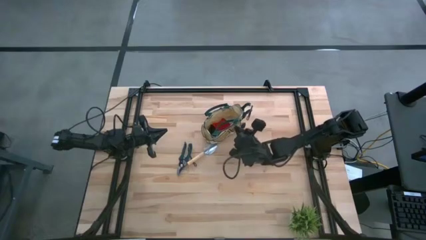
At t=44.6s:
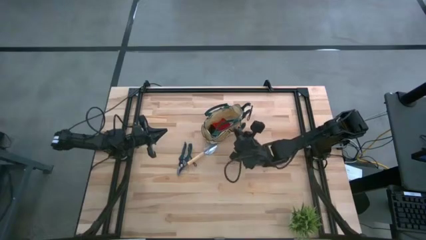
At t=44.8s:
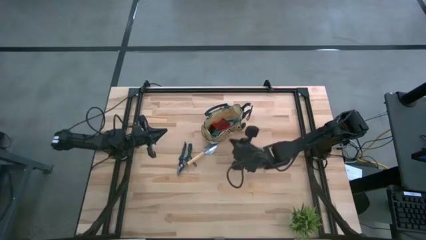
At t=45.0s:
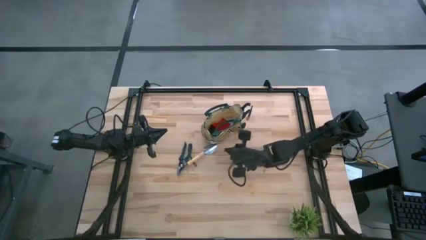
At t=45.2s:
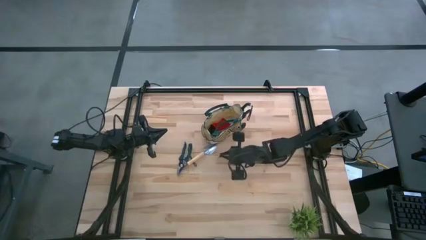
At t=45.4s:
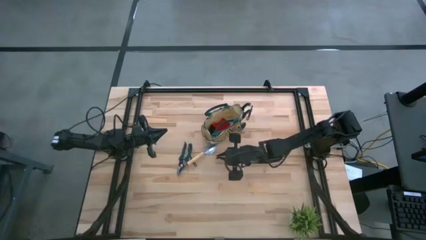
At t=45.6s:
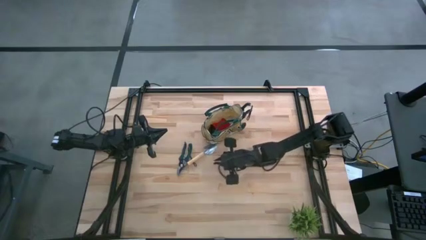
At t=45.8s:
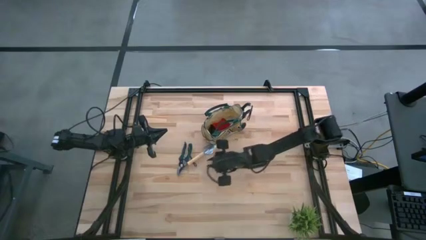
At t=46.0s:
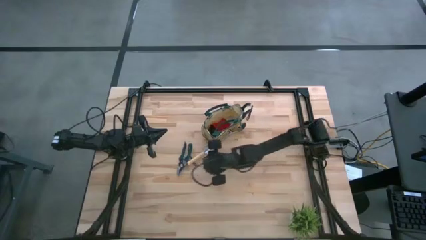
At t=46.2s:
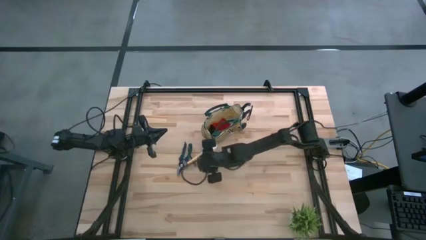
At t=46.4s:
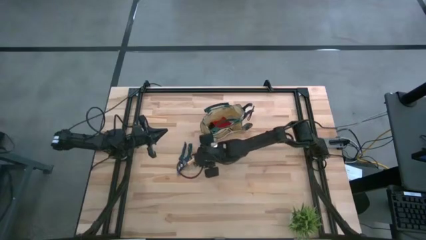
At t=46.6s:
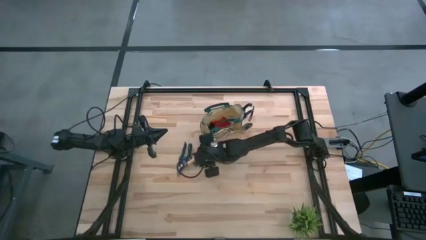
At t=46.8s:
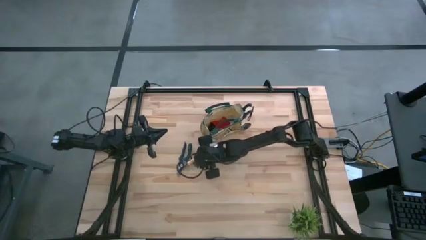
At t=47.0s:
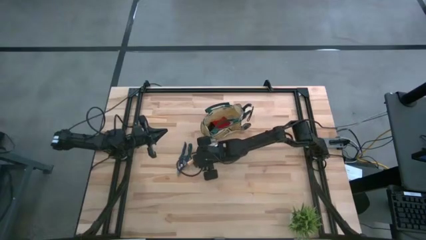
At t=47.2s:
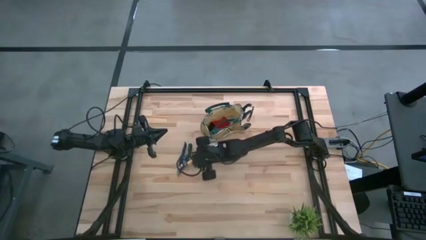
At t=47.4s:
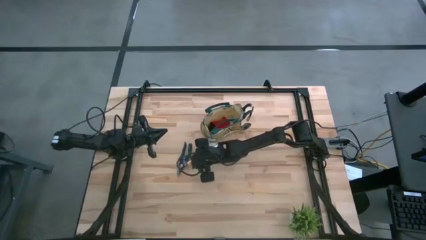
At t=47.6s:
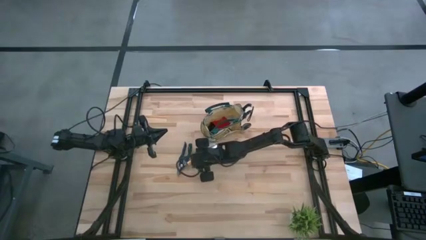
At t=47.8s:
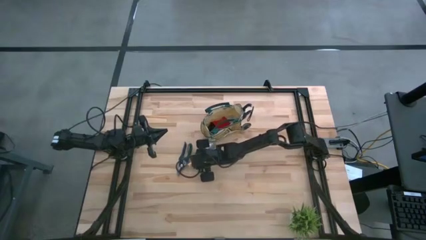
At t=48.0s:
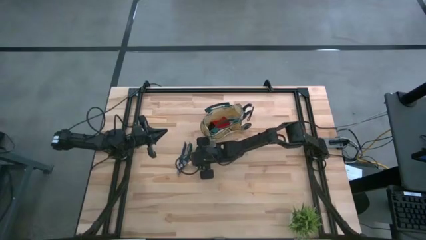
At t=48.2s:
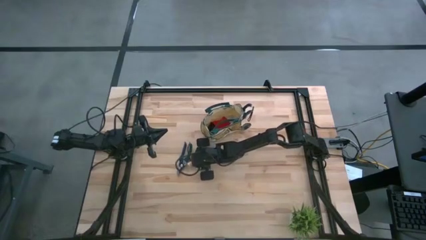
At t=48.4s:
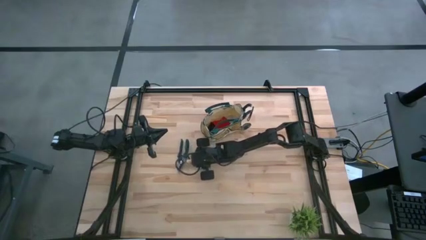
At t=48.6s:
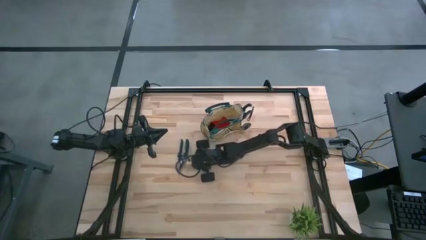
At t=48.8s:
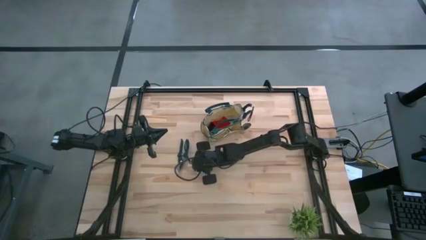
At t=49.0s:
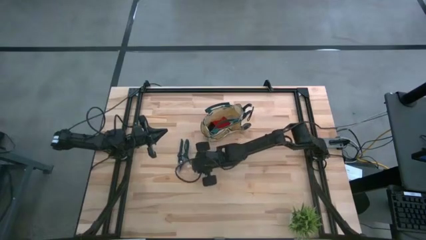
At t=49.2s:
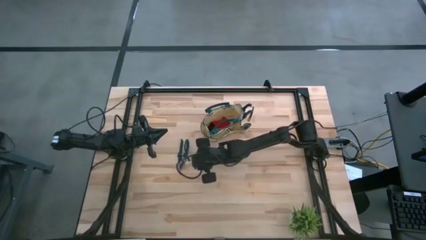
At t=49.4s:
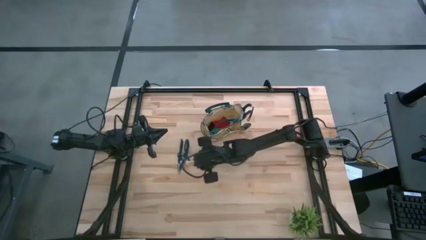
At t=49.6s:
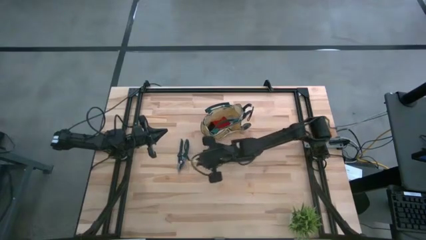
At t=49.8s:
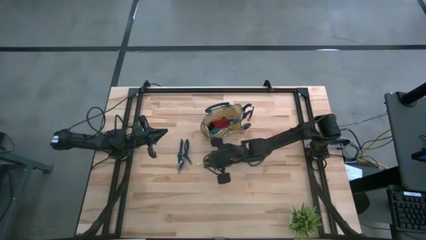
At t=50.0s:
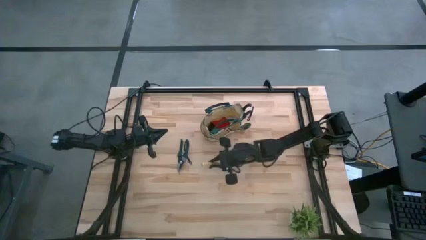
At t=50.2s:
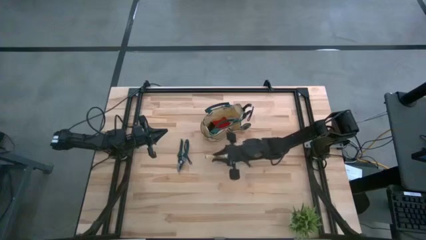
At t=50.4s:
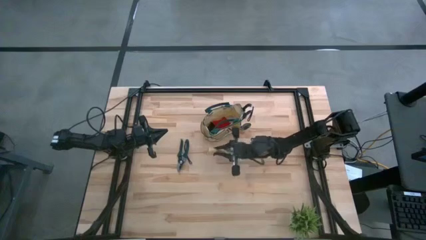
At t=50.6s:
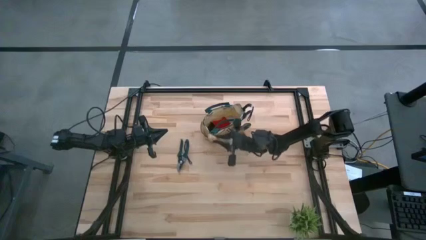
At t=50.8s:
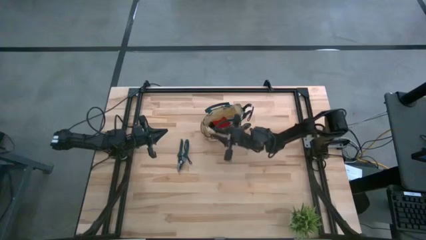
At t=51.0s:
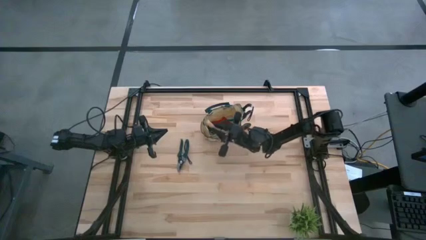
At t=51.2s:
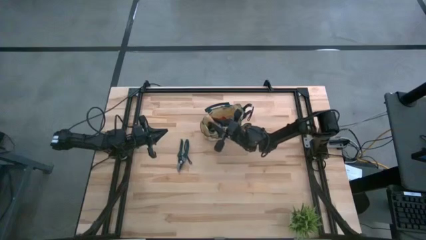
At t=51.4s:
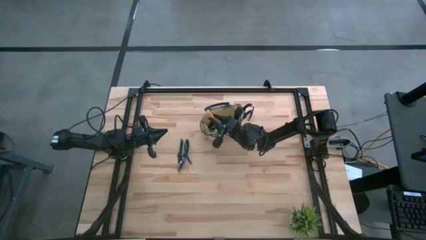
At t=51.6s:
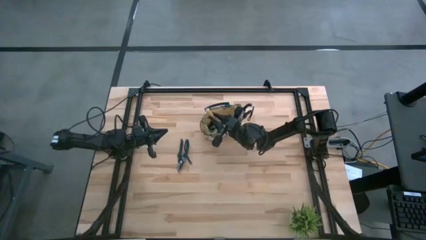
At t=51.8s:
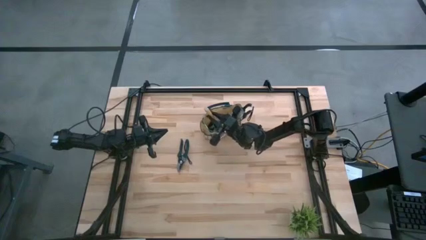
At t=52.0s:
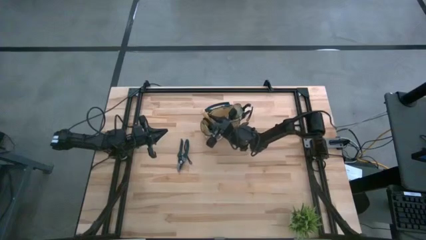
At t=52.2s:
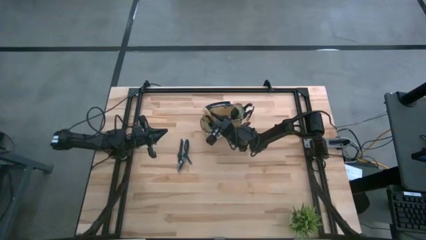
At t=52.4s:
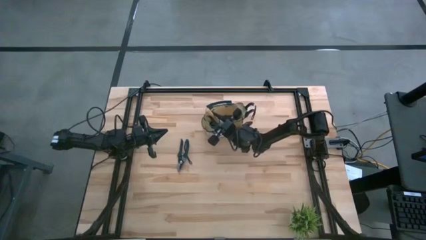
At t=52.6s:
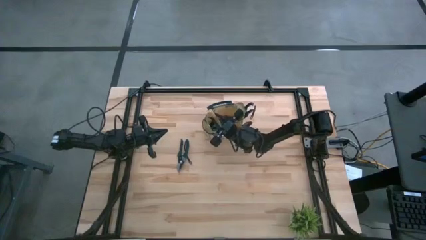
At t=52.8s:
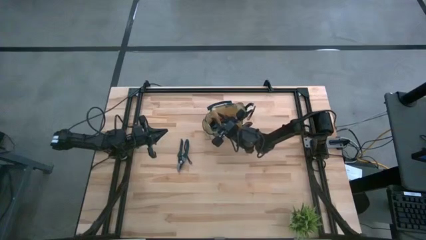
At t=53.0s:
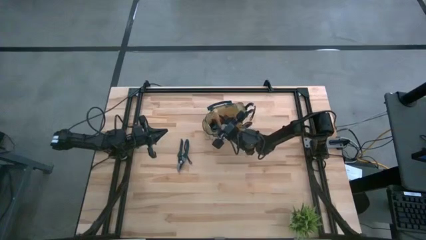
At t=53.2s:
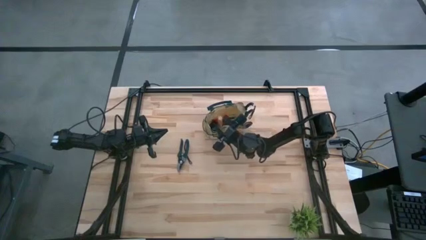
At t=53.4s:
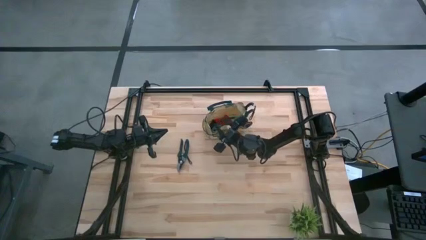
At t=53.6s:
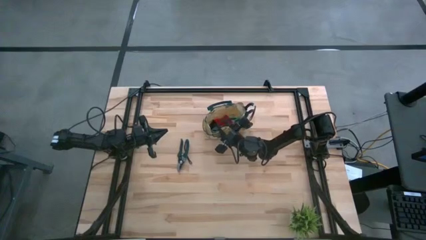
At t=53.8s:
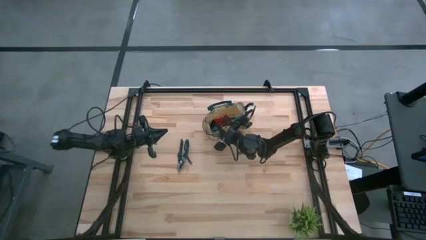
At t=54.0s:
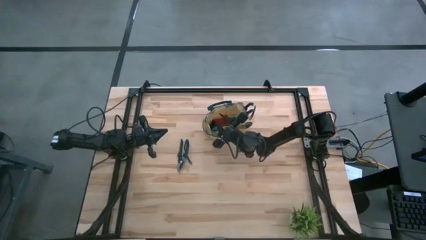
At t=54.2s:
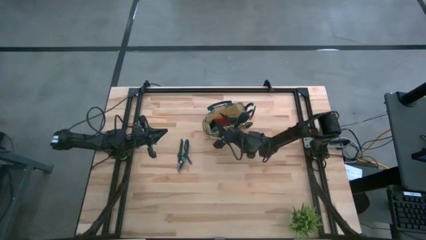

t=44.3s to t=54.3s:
Task: Pick & Place Garden tools in Gardening bag
Put the trowel into the gardening bag

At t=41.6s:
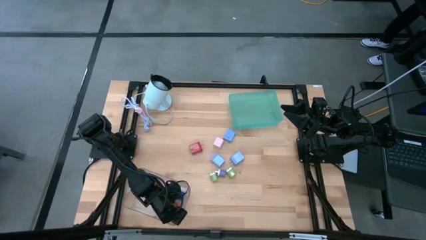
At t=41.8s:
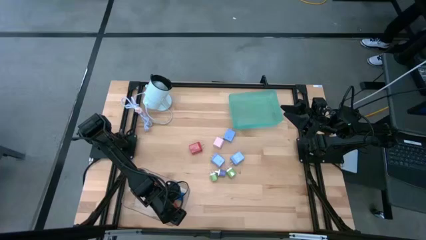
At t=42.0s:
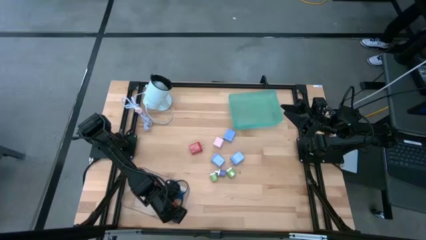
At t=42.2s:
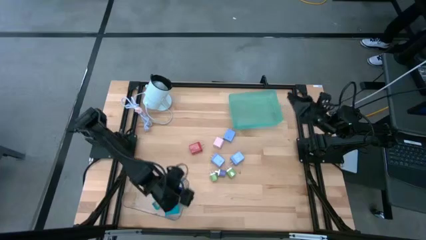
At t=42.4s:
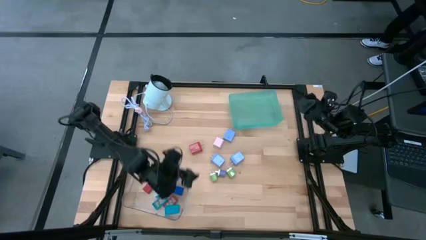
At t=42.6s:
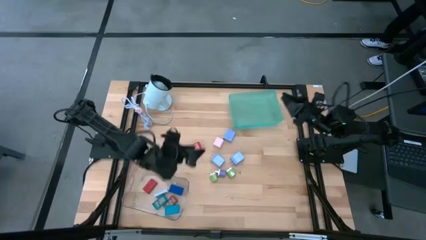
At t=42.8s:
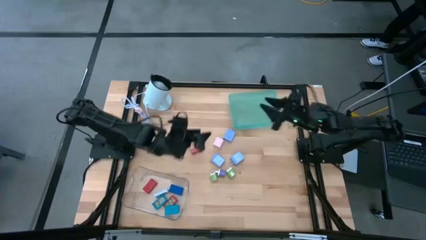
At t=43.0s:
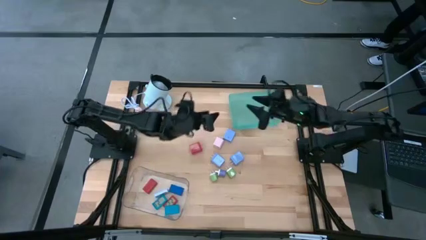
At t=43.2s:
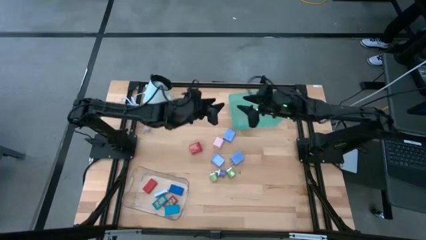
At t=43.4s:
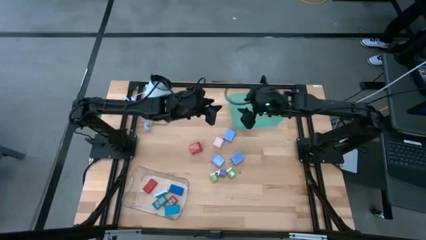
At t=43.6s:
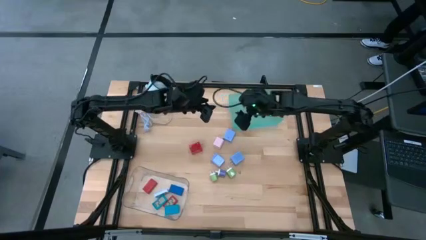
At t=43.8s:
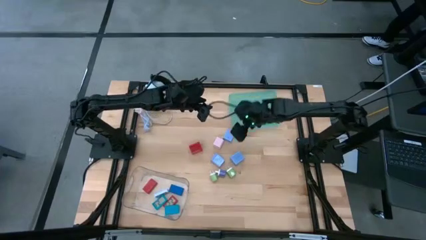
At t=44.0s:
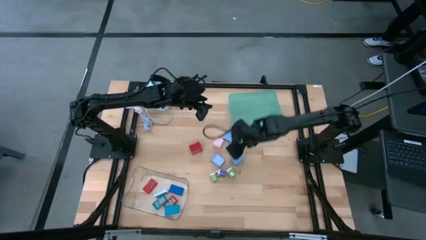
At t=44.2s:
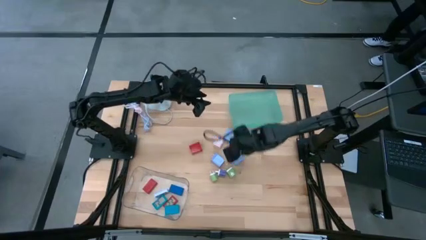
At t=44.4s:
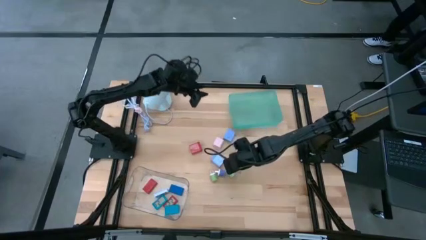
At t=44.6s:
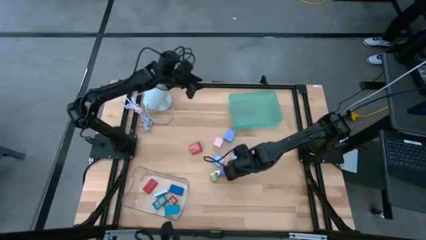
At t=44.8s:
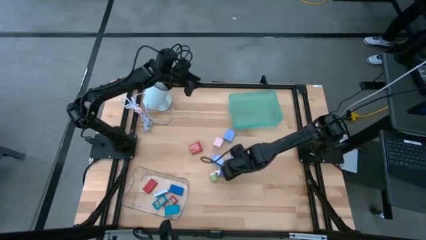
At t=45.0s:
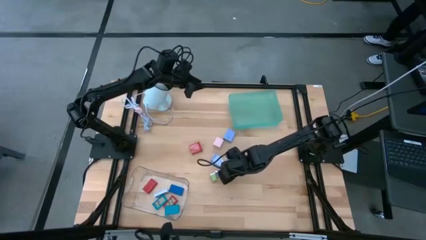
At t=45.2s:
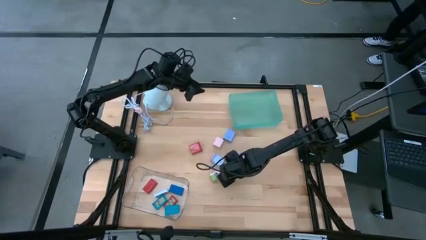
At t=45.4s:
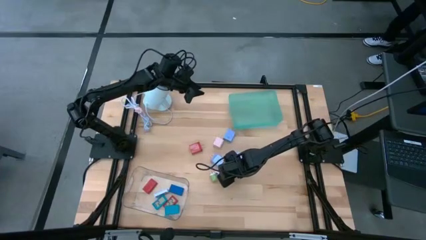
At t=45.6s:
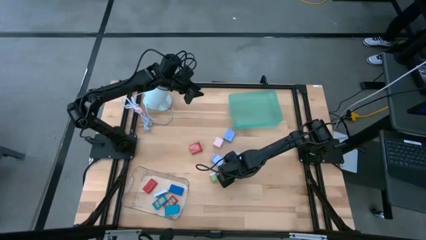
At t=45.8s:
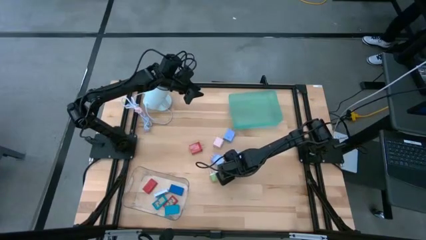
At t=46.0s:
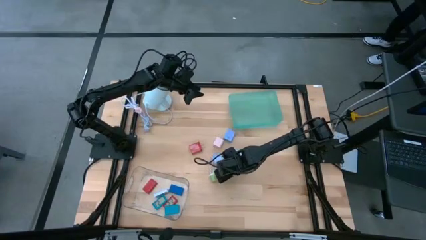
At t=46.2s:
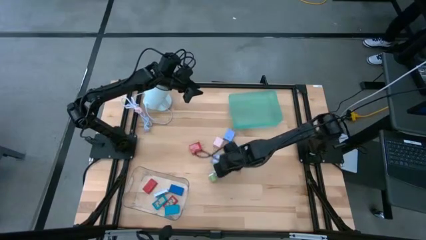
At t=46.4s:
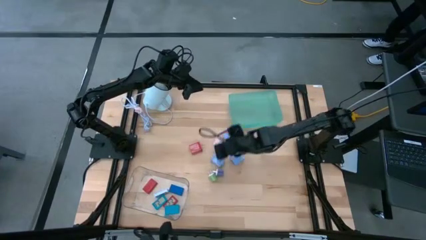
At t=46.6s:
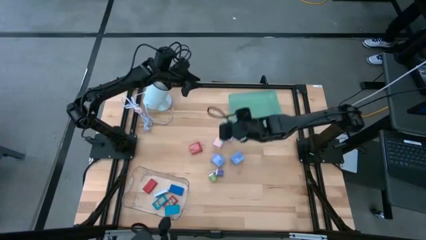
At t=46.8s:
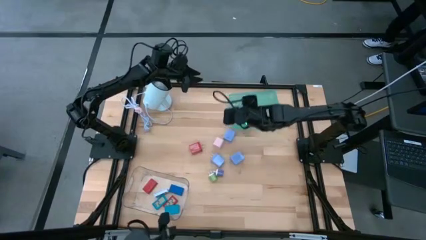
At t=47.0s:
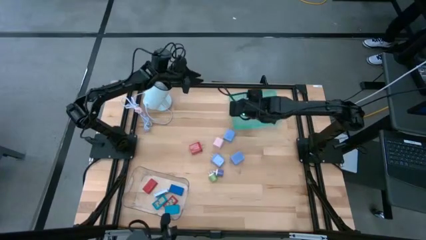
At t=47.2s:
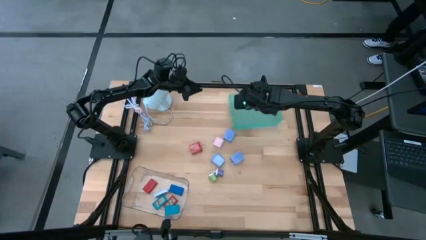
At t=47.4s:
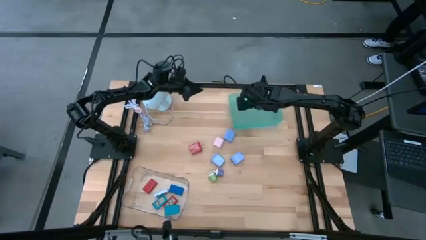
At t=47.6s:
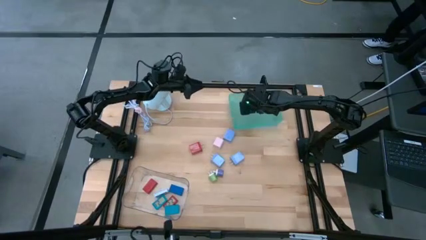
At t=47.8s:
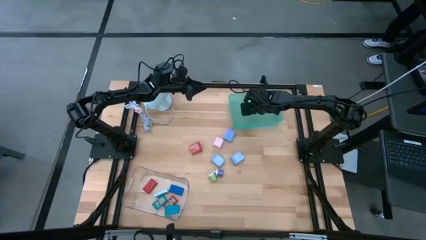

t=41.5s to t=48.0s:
Task: Pick & Place Office items
Put the green charger adapter into the light green bin
